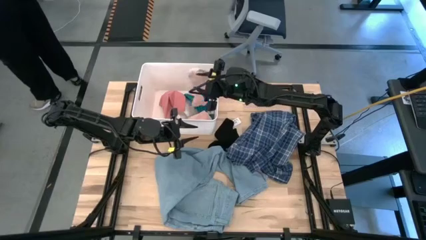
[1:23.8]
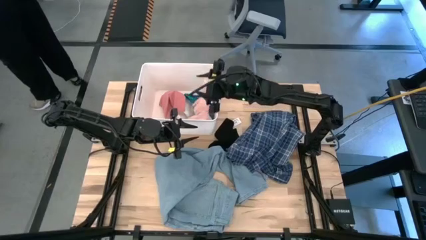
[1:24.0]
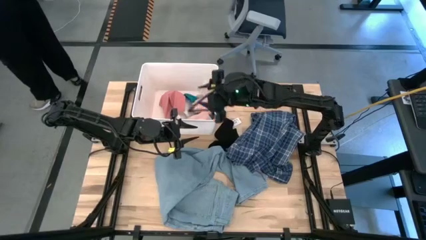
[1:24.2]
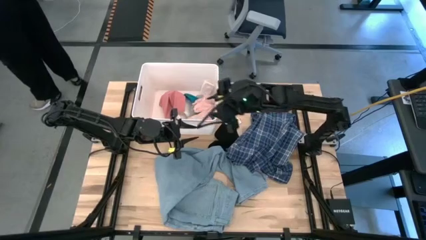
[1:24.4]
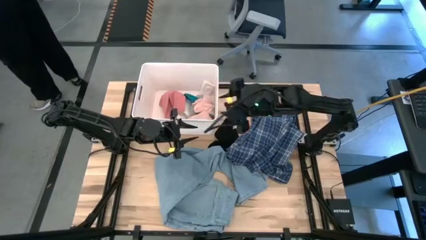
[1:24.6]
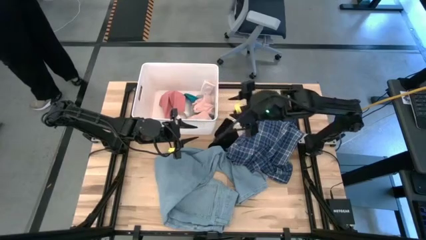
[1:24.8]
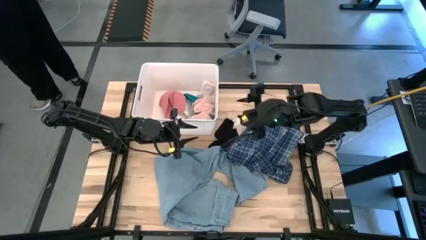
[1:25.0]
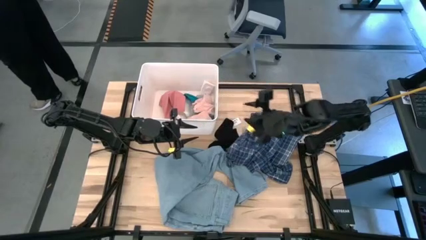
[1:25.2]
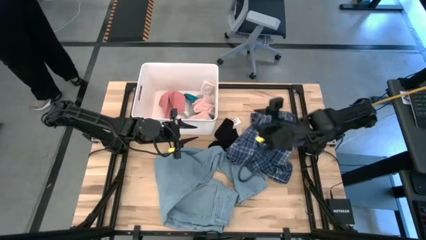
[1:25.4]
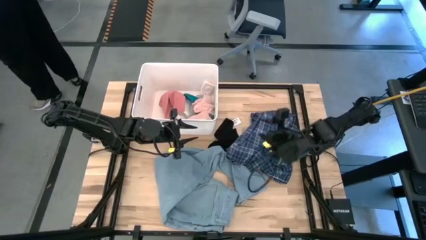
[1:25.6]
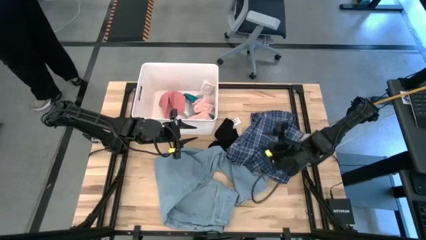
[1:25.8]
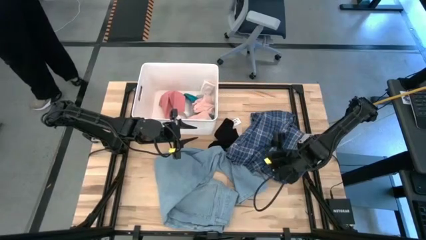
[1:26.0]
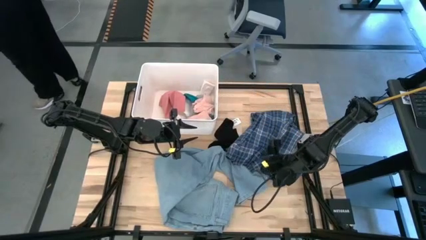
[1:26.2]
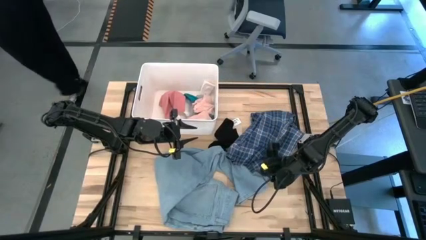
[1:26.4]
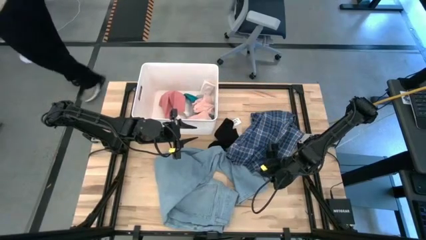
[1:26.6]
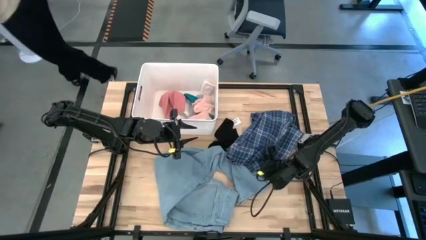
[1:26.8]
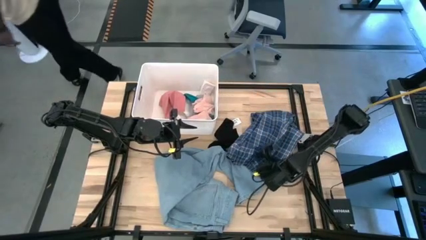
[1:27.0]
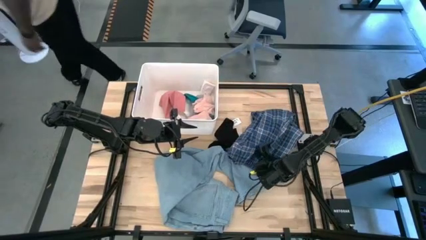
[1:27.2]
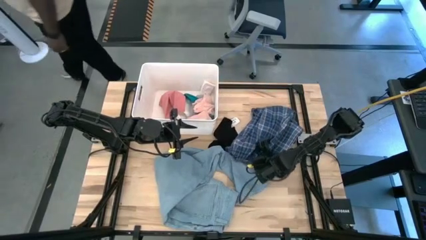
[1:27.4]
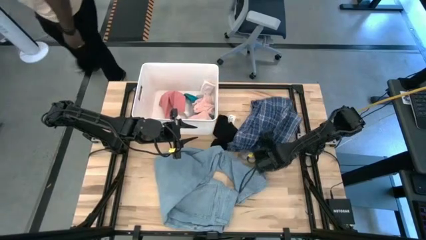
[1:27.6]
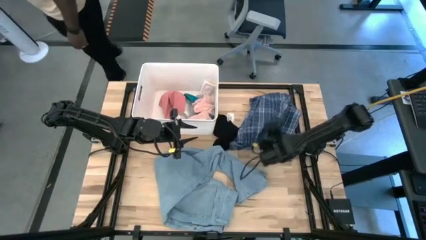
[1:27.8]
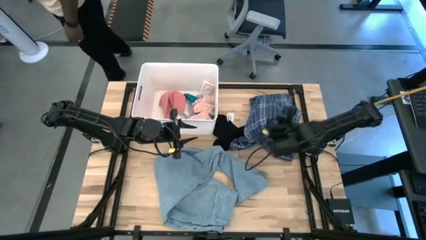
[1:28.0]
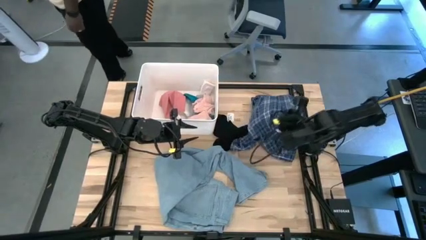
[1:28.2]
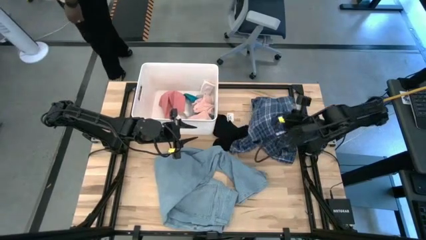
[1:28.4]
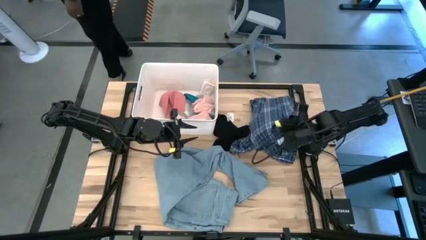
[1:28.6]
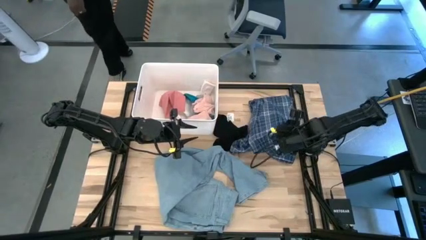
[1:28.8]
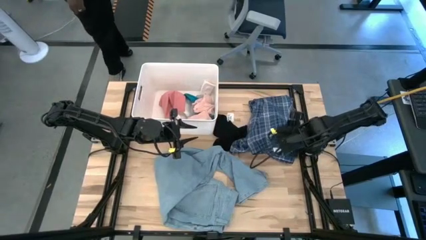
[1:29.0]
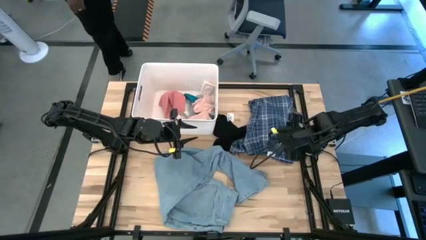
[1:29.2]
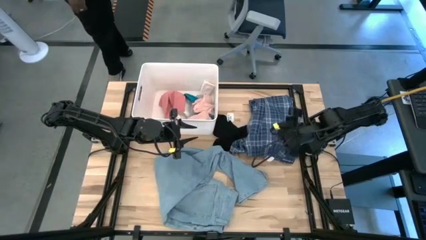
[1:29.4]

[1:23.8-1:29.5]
Task: Sort clothes
Move the blue plaid shirt to the top of the table

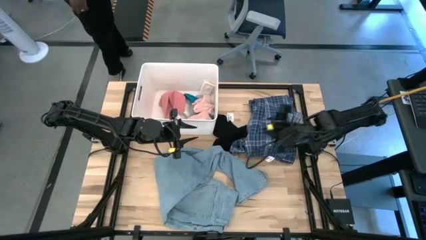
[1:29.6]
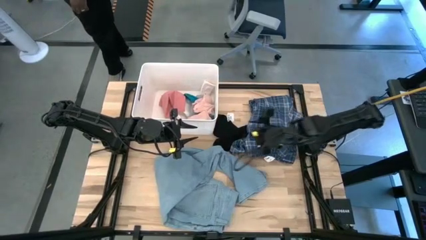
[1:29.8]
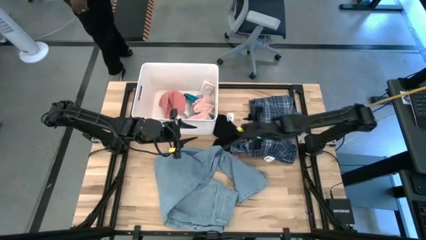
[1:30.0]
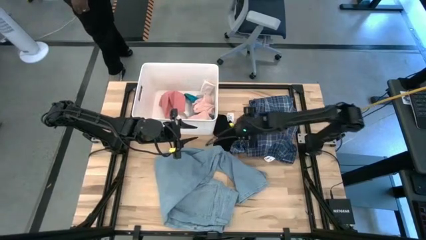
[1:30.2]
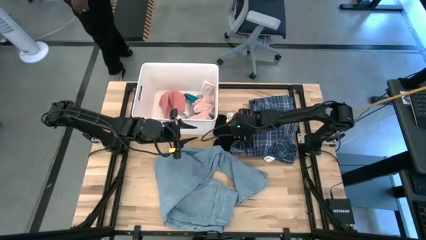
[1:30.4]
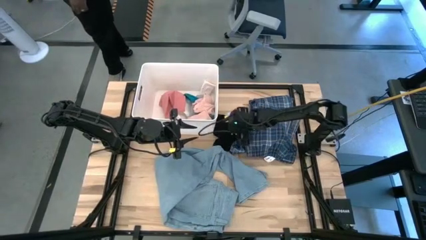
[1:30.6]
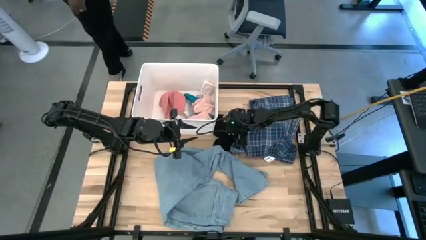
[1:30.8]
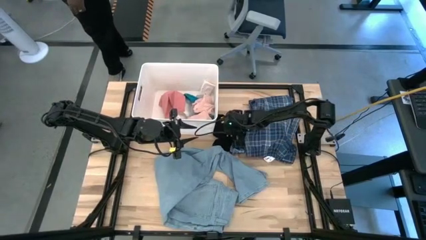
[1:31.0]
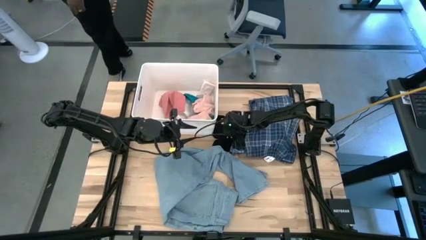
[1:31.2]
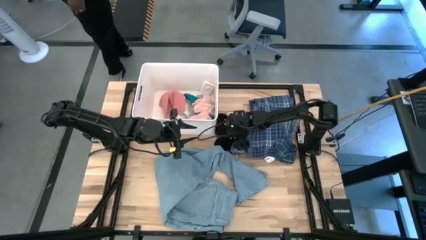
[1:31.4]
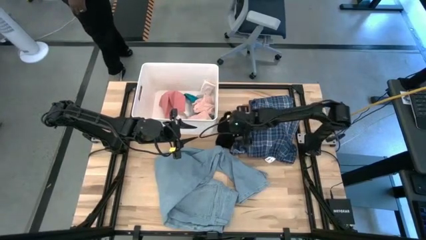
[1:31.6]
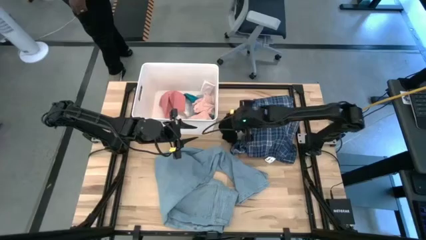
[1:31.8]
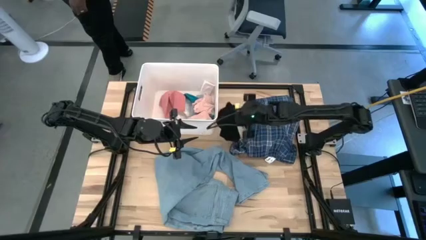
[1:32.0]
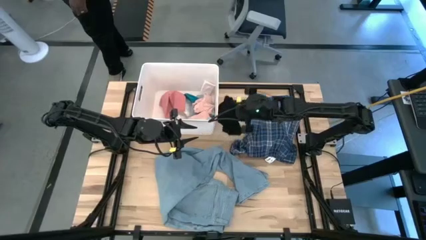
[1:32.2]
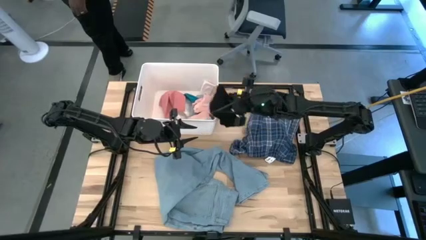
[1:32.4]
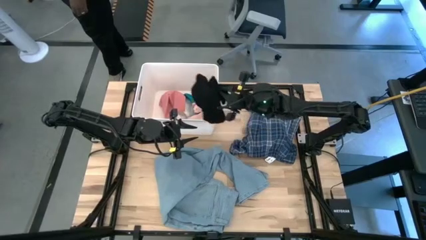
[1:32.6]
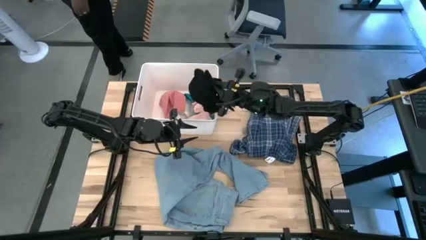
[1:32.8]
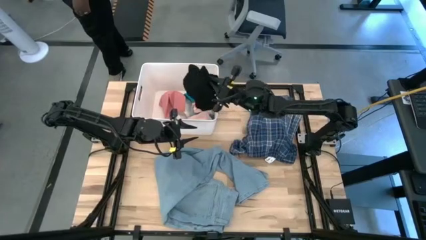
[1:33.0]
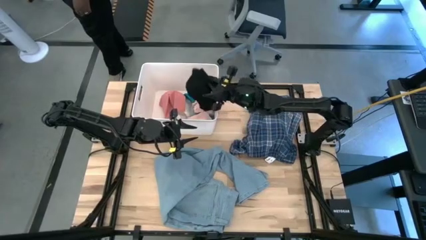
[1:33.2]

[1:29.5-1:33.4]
Put the black shorts into the white bin

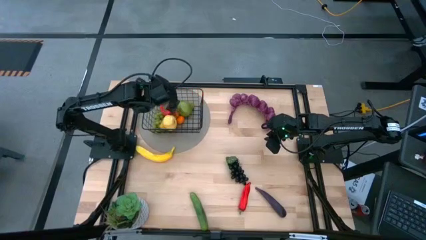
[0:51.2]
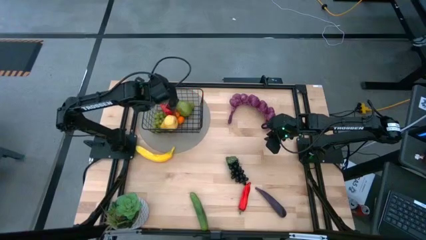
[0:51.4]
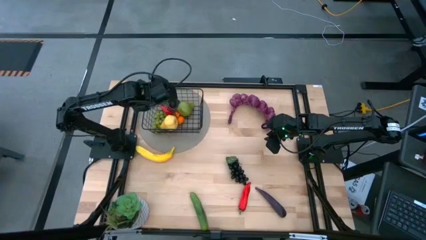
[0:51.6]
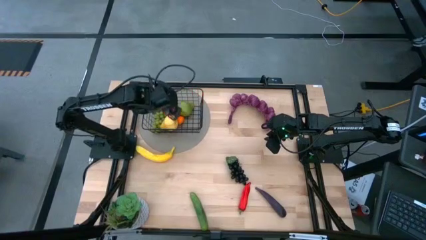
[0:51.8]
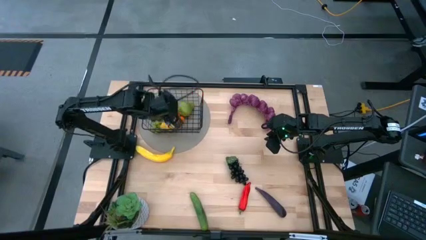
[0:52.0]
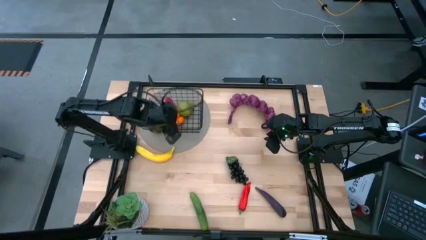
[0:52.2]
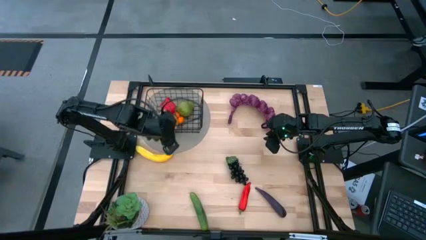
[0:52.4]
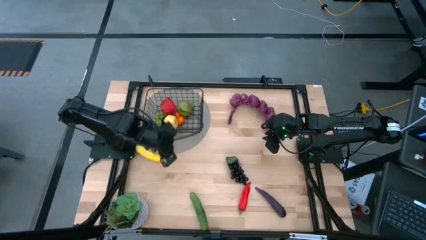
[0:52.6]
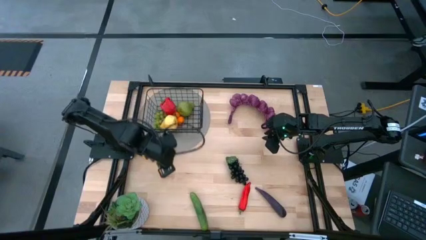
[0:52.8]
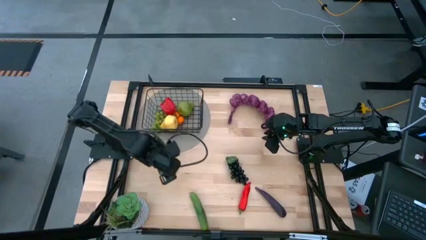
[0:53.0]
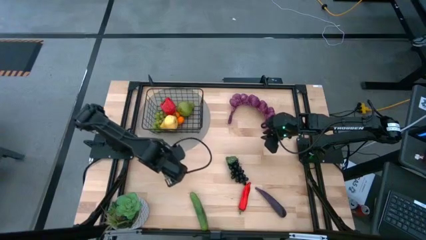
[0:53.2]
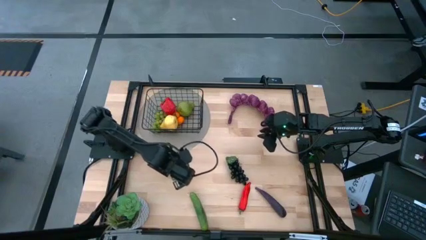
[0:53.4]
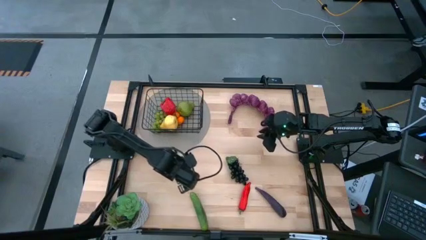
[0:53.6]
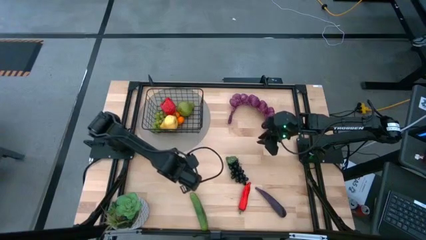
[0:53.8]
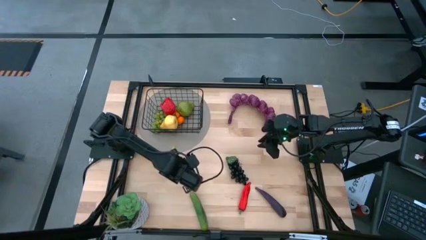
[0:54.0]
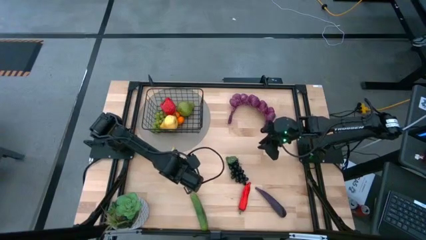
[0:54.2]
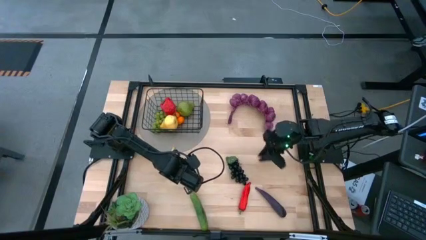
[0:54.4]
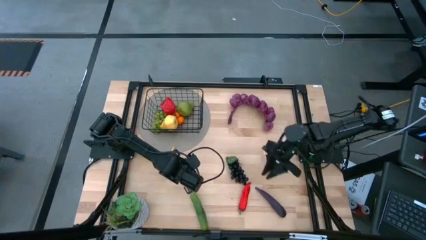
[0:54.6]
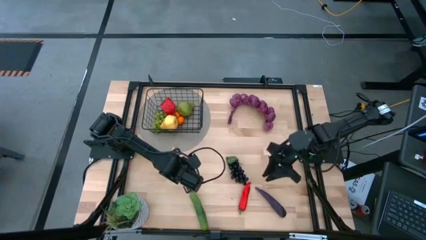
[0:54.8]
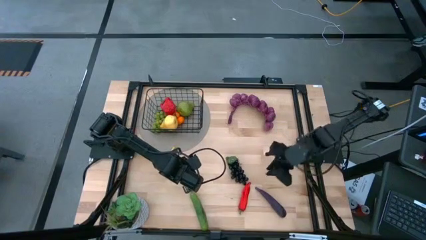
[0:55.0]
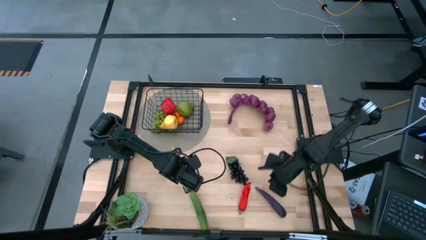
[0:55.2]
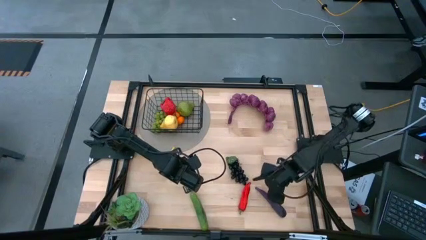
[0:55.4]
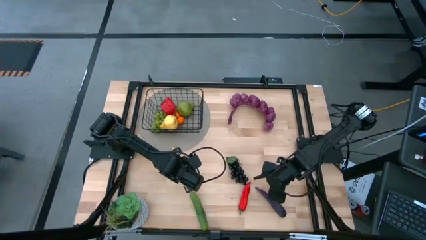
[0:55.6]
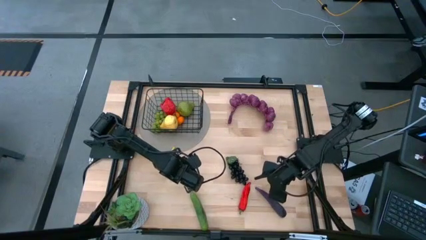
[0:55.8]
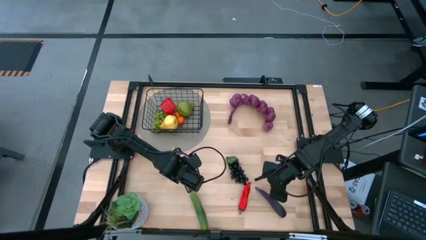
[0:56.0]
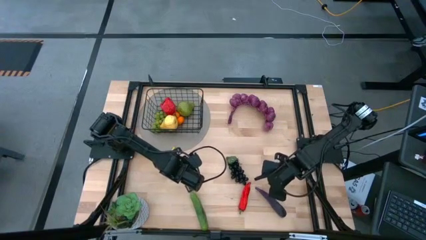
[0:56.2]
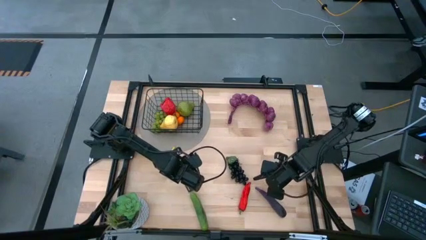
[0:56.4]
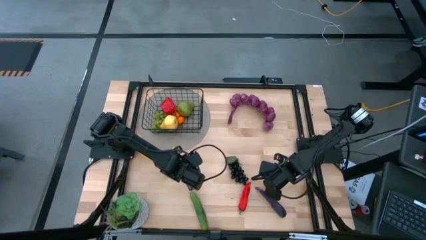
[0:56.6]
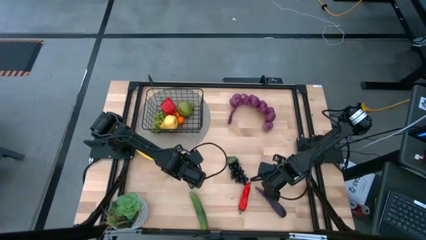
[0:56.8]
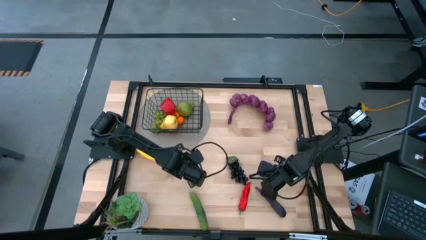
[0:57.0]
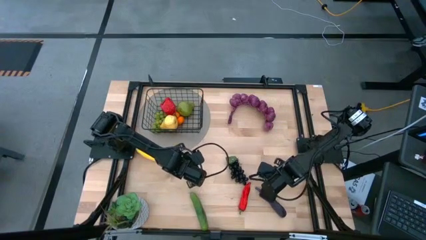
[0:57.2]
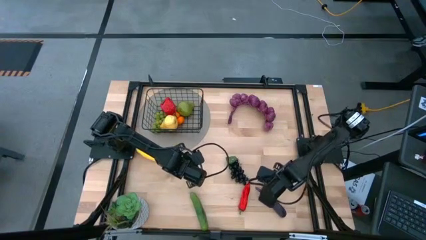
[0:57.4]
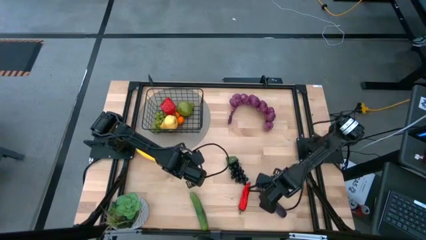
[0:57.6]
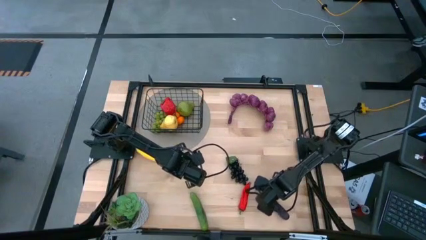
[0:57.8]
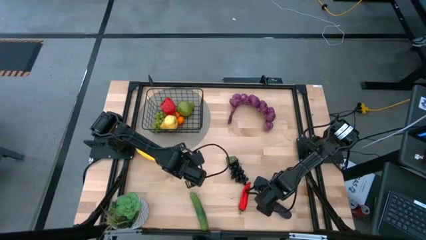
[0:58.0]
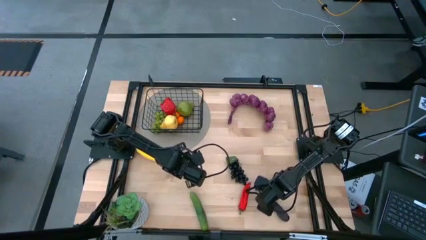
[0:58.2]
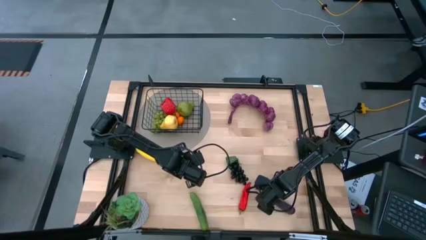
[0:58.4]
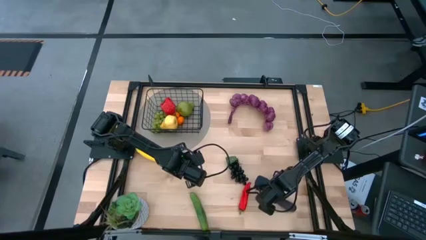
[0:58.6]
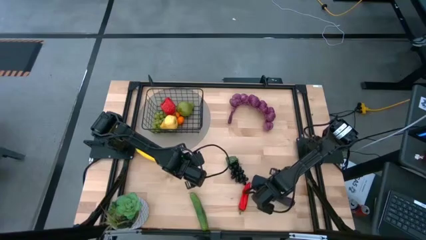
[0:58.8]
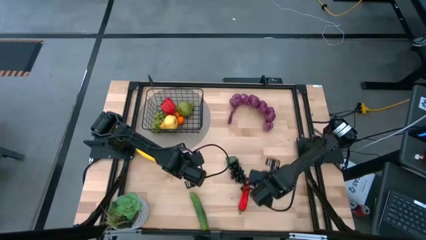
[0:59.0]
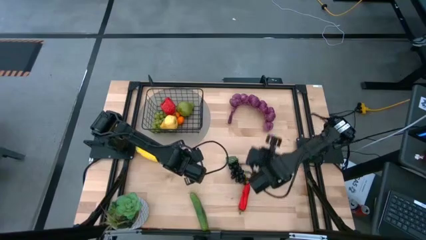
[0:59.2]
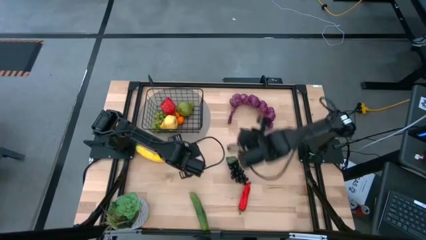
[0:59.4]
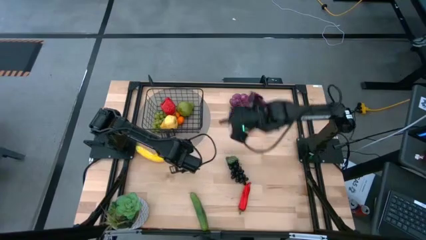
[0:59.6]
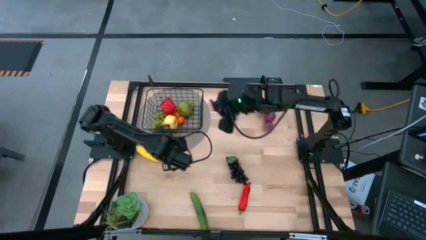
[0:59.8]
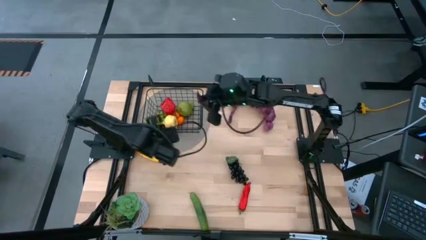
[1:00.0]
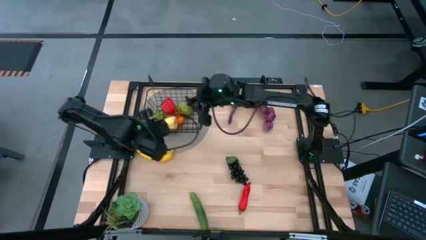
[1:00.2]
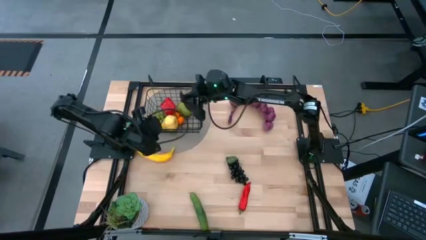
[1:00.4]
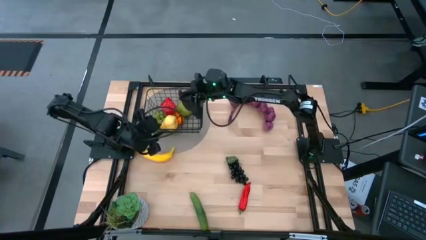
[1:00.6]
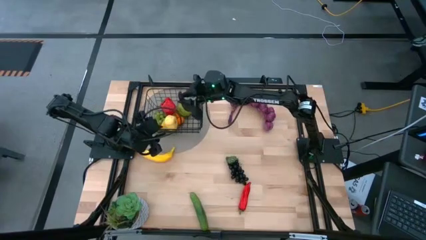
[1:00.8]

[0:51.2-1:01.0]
Task: Build produce basket
Put the eggplant into the wire basket
